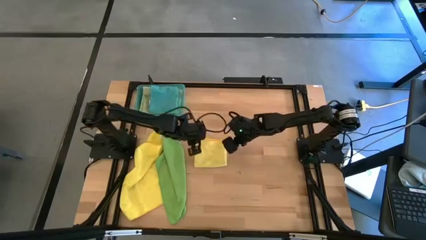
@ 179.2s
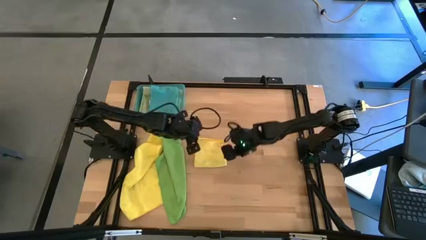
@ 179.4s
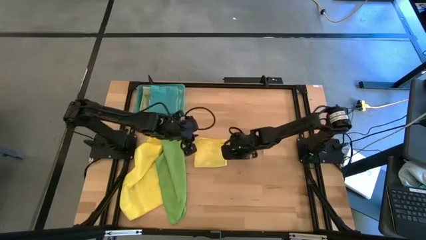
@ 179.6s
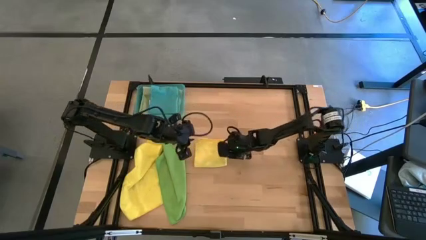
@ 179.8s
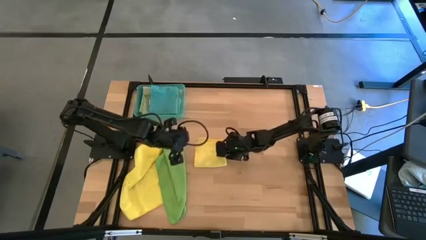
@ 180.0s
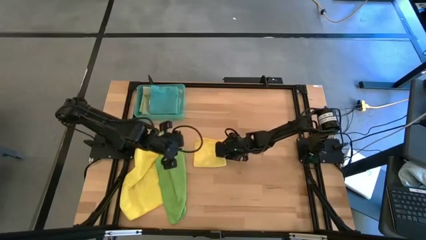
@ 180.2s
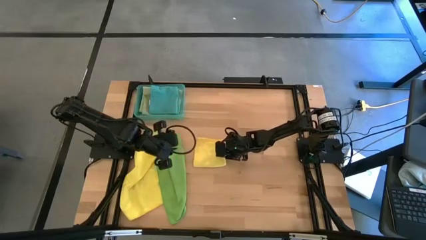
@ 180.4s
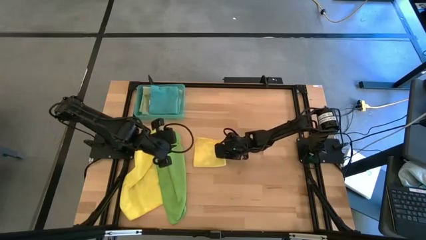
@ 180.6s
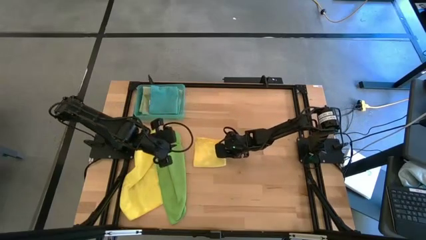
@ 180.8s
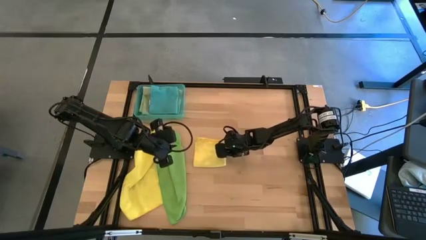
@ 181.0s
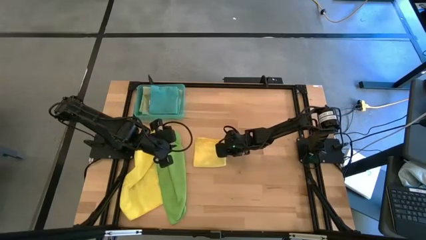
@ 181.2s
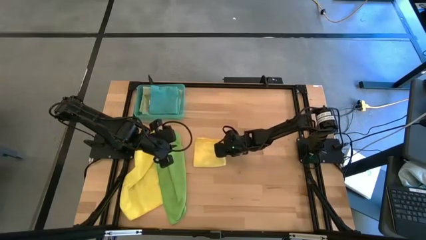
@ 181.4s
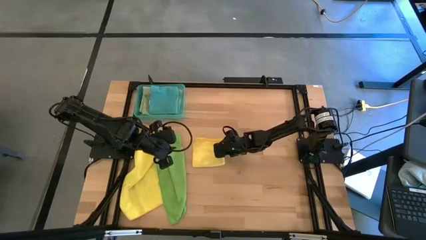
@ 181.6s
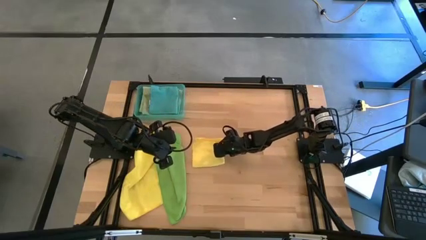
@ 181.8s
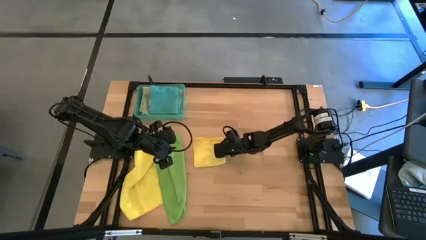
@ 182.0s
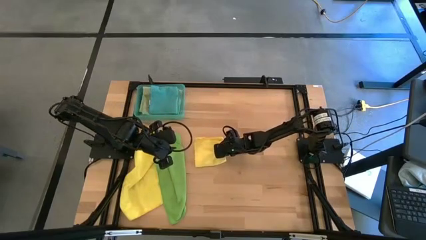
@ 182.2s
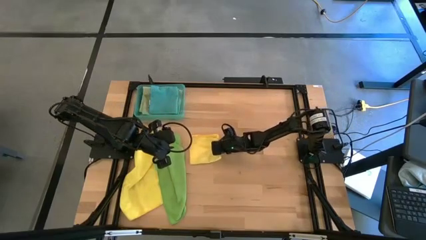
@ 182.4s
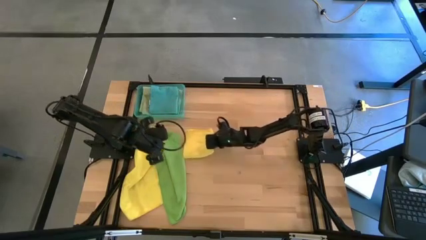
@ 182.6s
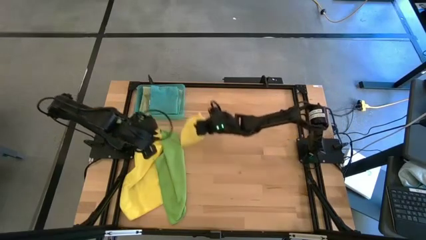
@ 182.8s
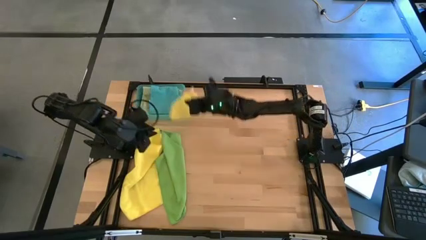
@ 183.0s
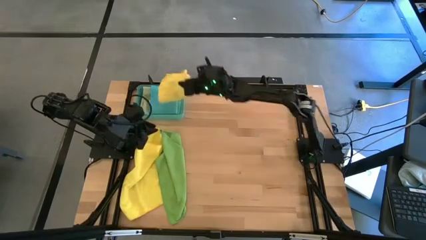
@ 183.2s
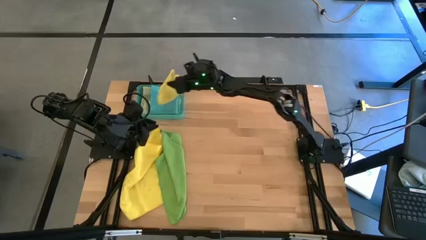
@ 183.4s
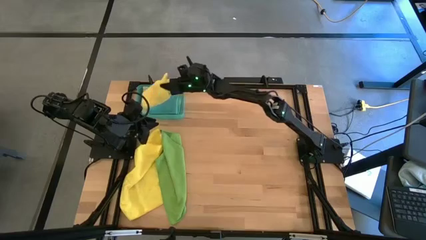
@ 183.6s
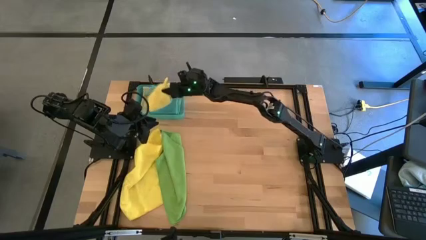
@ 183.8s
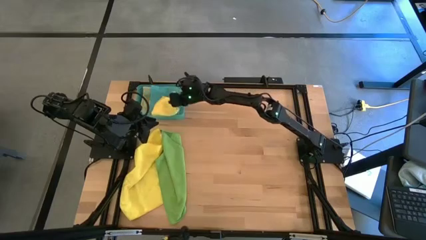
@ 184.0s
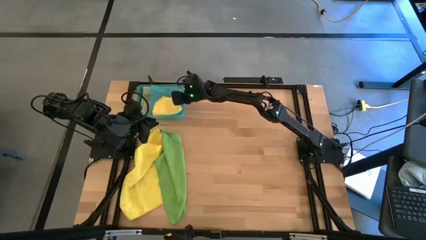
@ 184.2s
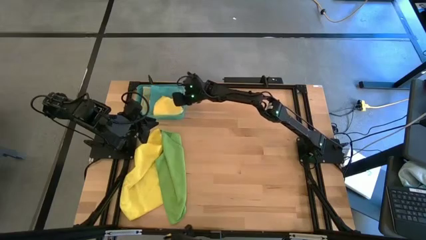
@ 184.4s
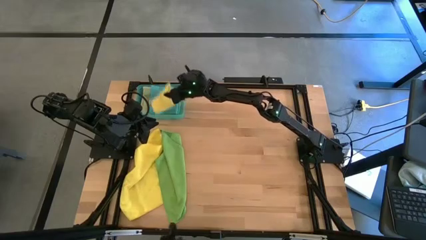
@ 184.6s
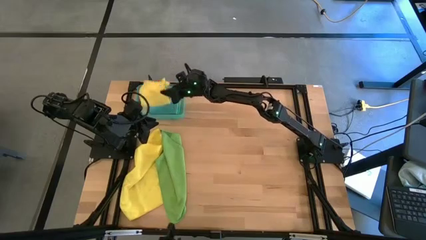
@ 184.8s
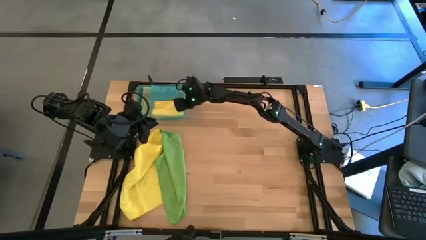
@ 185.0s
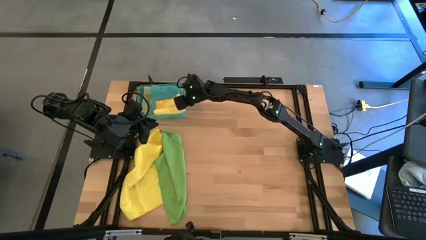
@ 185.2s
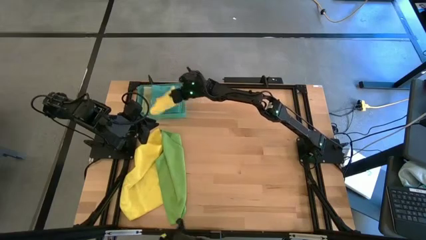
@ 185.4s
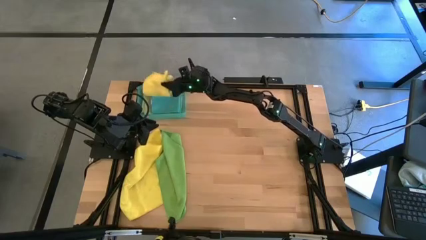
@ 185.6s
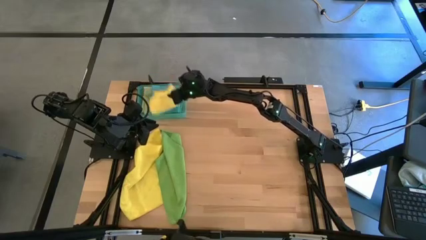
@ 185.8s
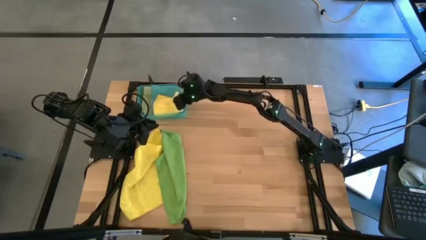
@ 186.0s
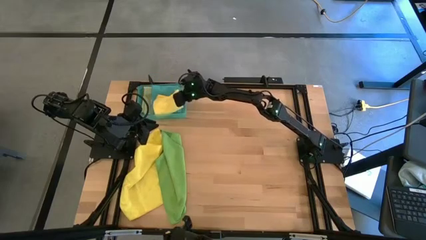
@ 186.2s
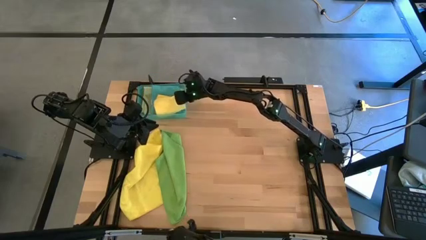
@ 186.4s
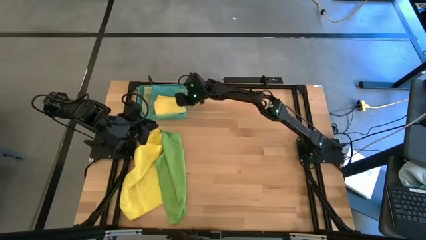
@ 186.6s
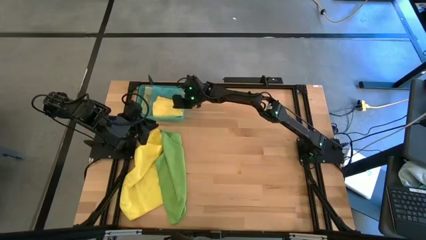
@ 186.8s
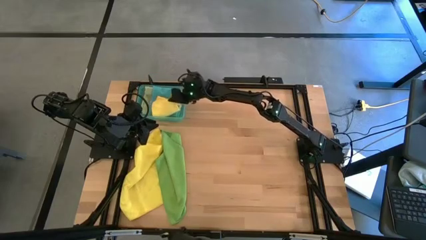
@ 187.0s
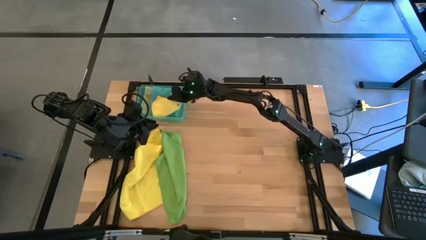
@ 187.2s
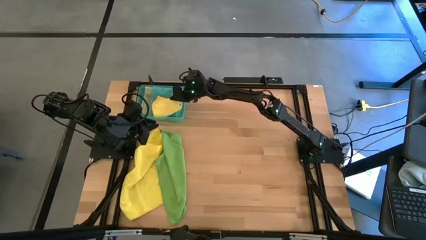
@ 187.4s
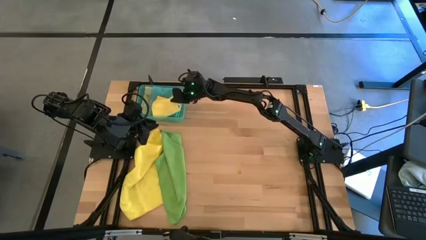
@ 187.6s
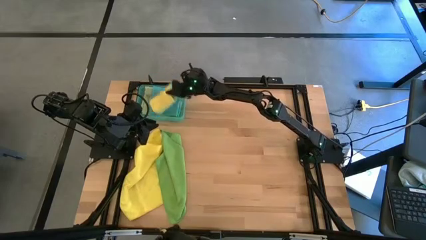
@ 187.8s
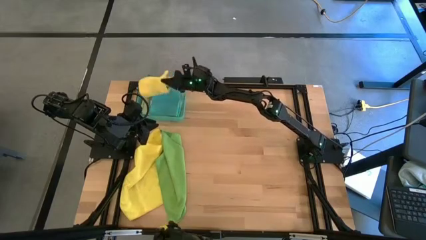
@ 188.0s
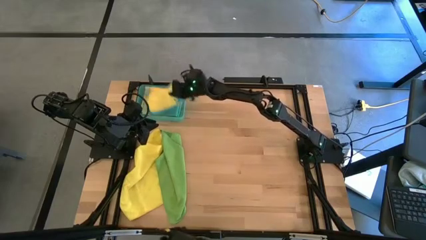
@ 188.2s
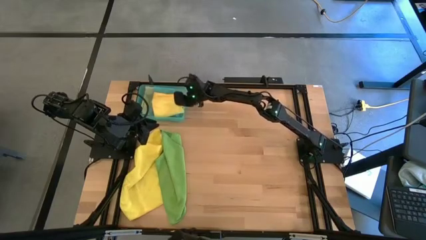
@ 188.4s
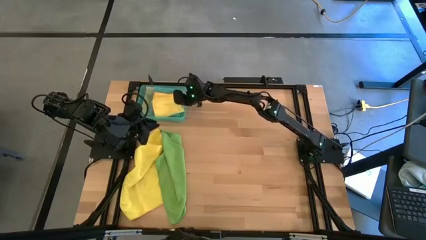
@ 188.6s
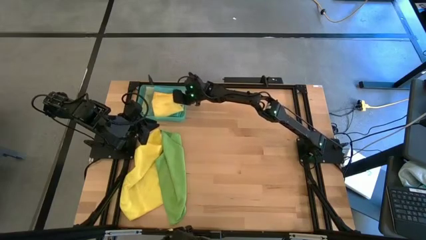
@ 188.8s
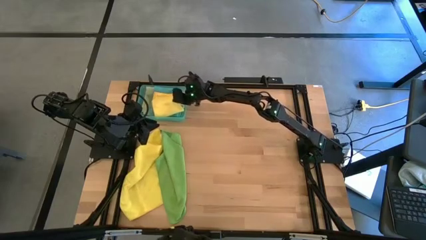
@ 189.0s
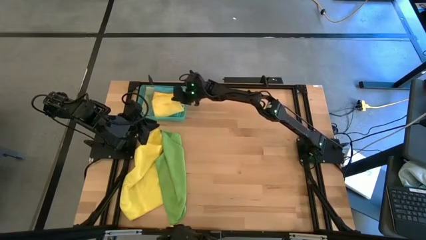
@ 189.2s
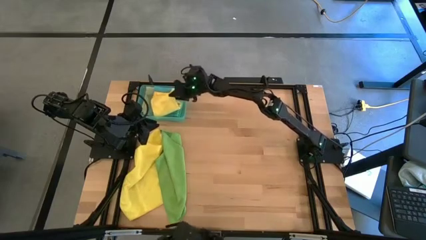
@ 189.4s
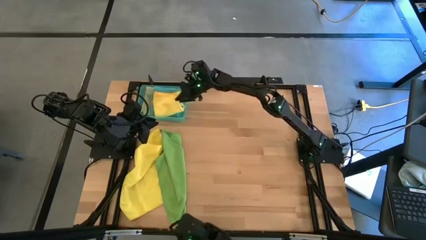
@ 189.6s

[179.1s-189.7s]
Task: Fold microfiber towels
Stack the folded right yellow microfiber cloth on top of the blue microfiber cloth in the blue bin

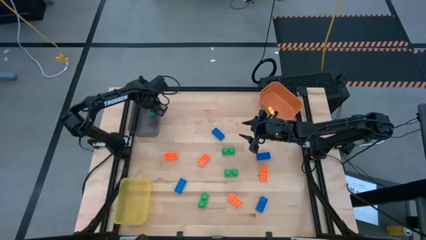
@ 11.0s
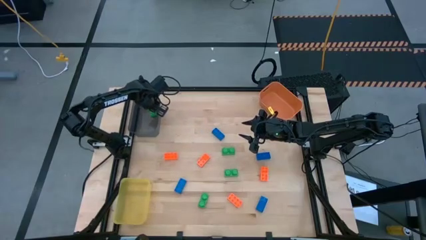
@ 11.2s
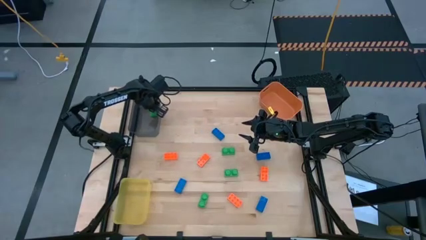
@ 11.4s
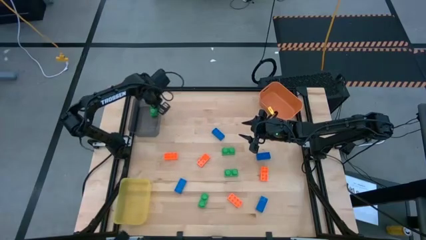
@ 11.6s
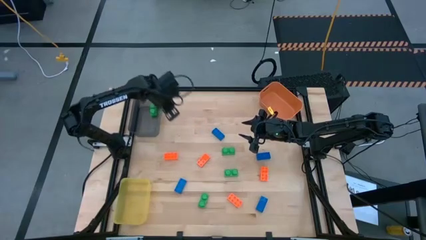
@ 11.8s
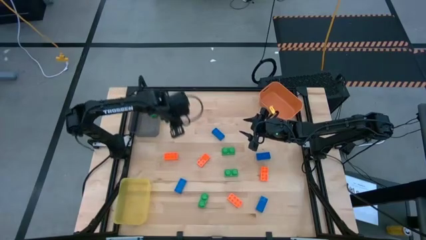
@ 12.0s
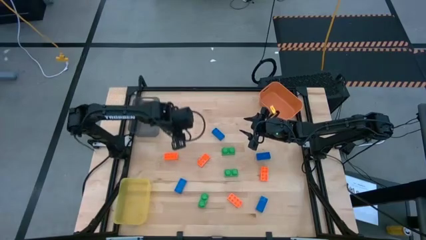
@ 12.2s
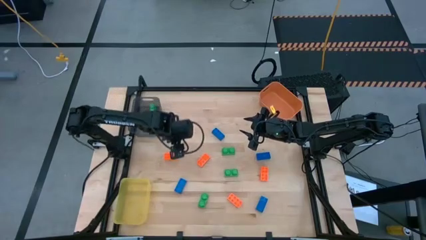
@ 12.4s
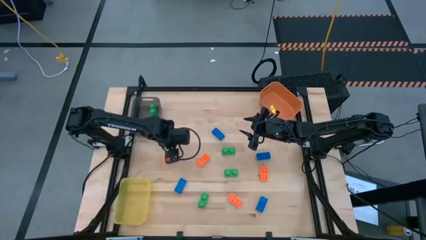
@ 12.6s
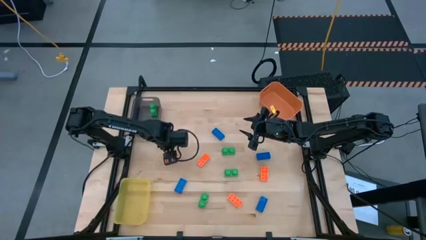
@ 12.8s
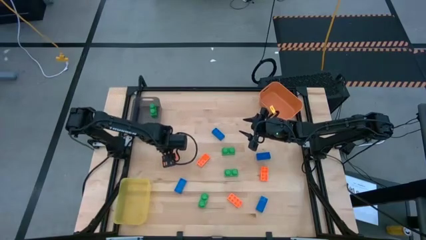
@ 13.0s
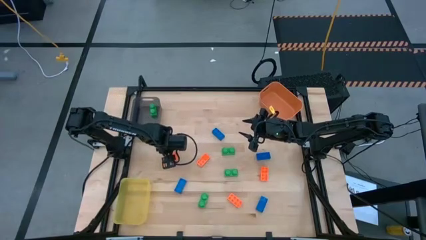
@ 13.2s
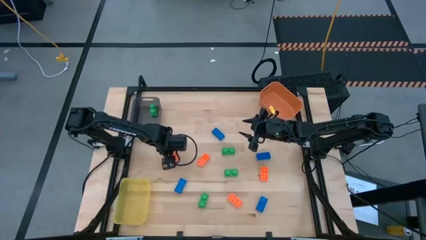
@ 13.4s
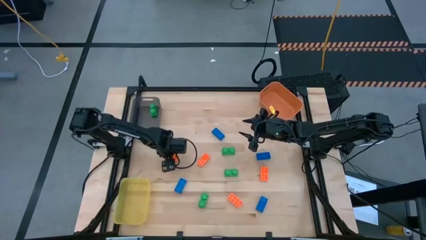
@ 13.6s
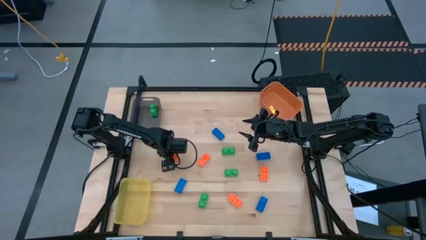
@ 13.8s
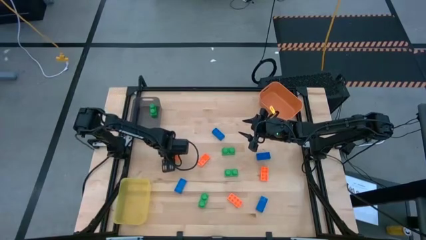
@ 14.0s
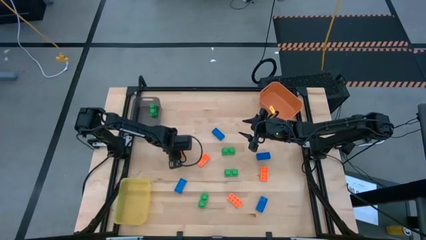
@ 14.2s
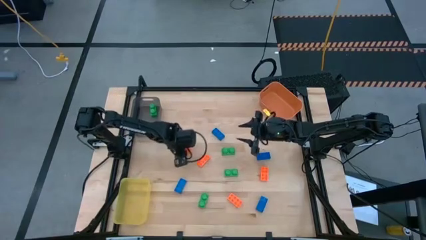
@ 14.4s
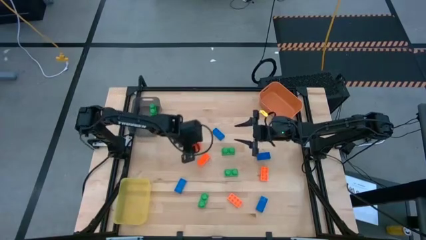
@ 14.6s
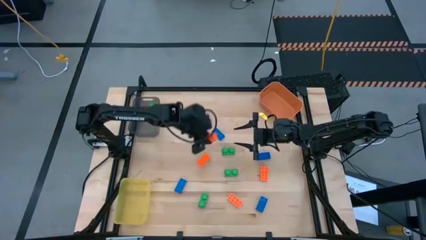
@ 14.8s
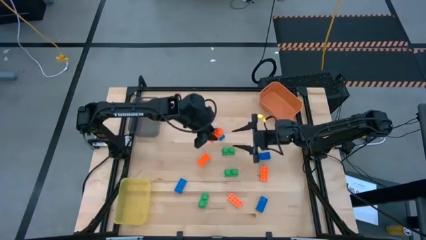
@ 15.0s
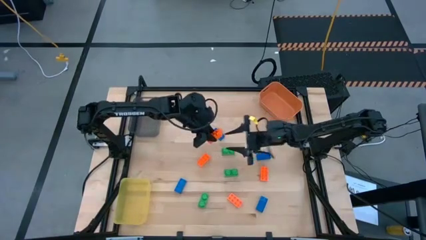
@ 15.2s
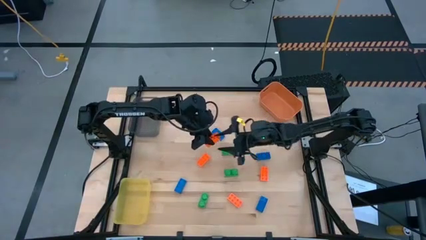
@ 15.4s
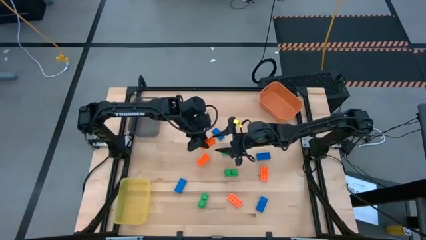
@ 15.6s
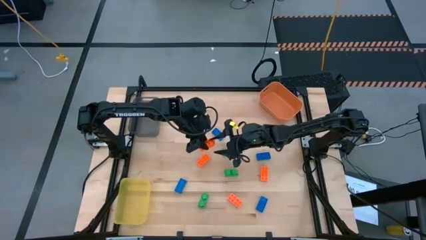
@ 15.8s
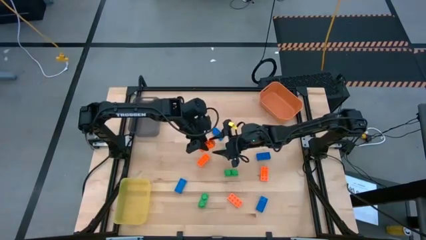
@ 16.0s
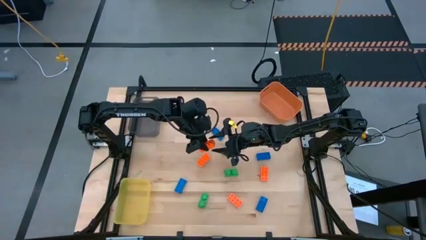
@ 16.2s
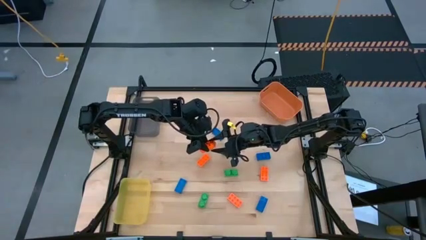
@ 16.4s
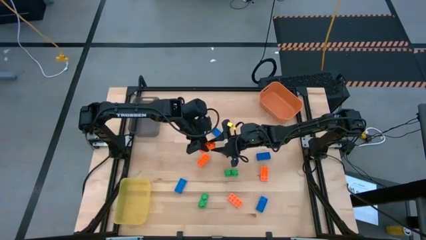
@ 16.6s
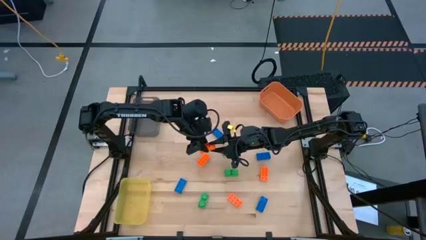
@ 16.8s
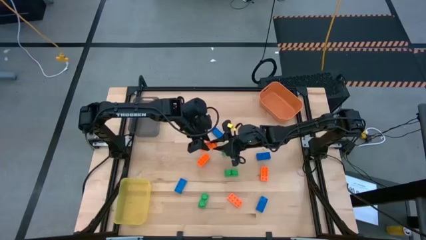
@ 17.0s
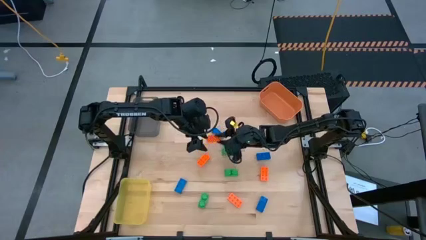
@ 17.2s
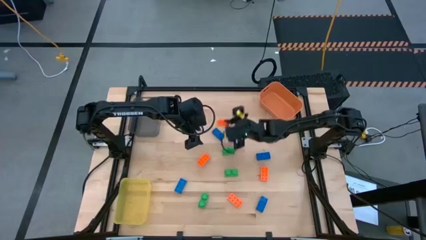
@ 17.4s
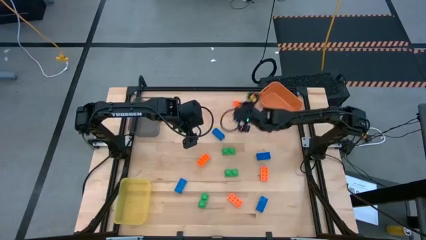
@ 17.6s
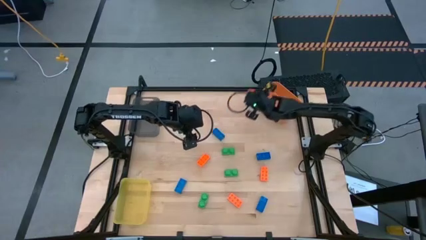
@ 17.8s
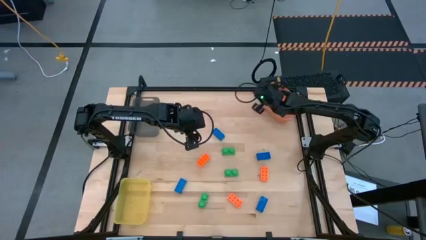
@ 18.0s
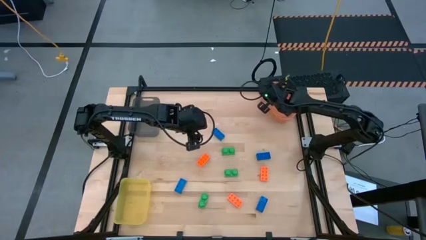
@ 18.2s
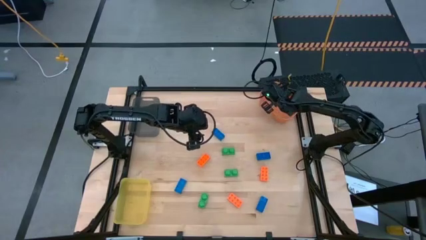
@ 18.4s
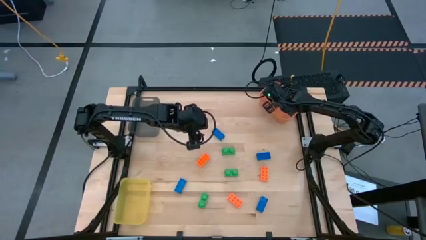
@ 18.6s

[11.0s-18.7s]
Task: Sort & place blocks by color
Put the orange game piece into the orange bin
